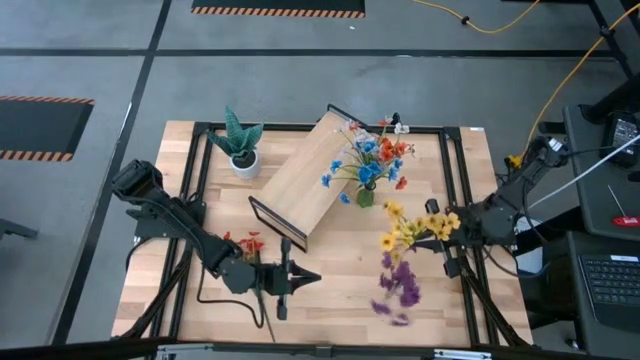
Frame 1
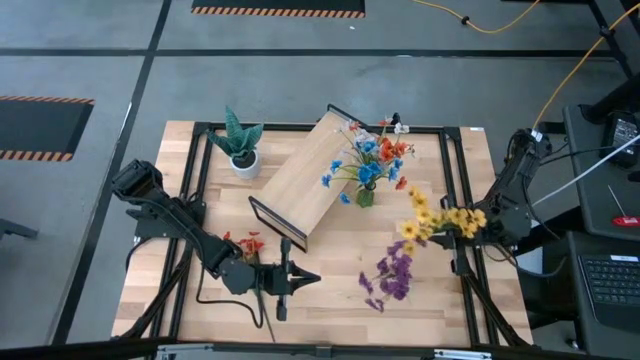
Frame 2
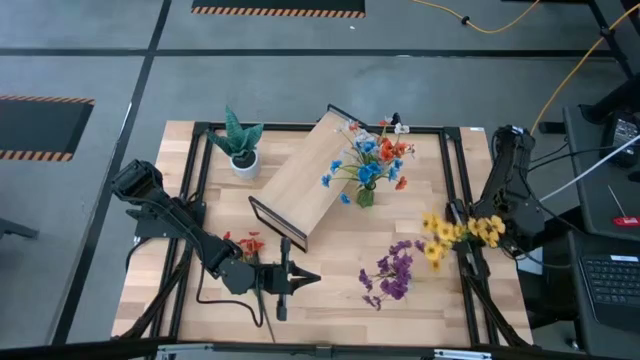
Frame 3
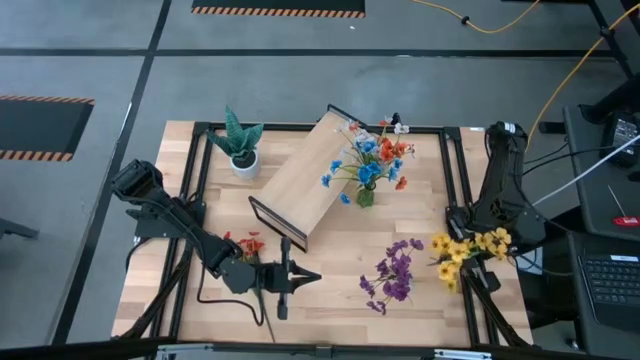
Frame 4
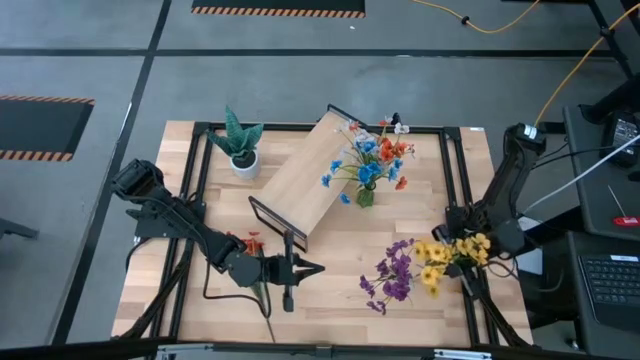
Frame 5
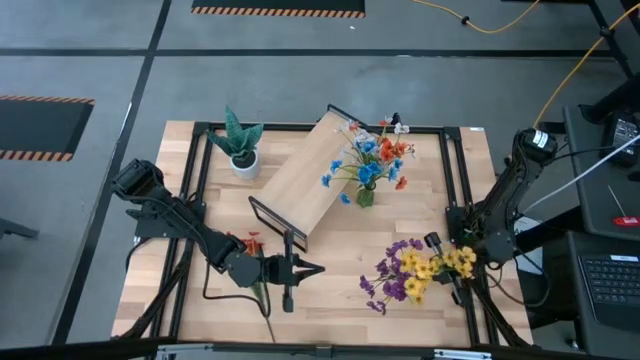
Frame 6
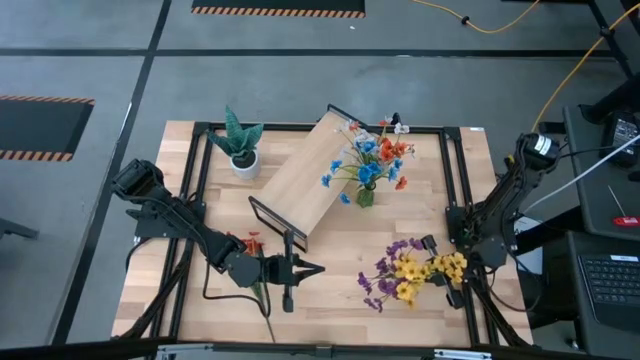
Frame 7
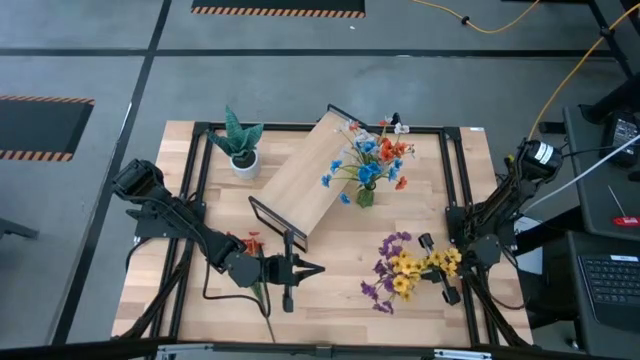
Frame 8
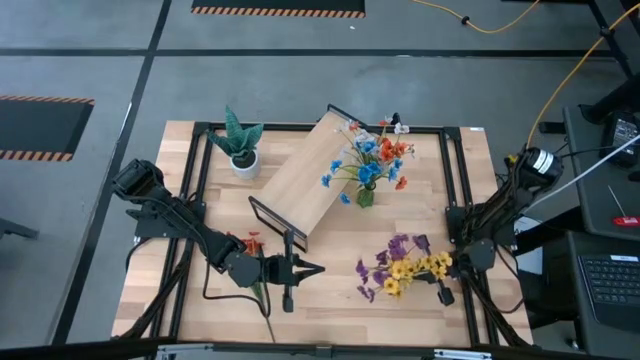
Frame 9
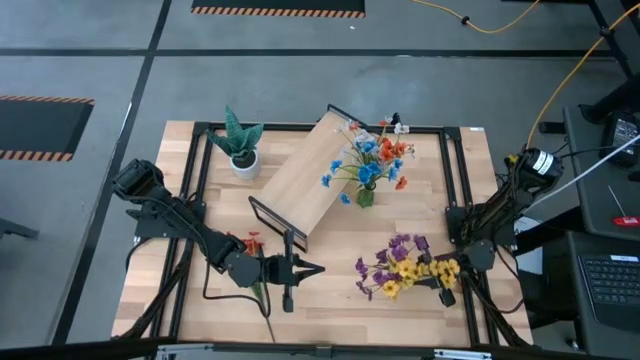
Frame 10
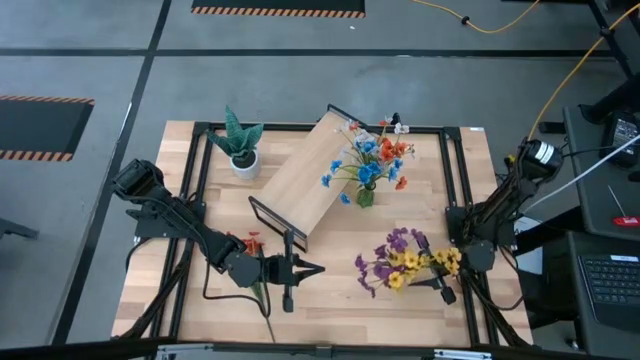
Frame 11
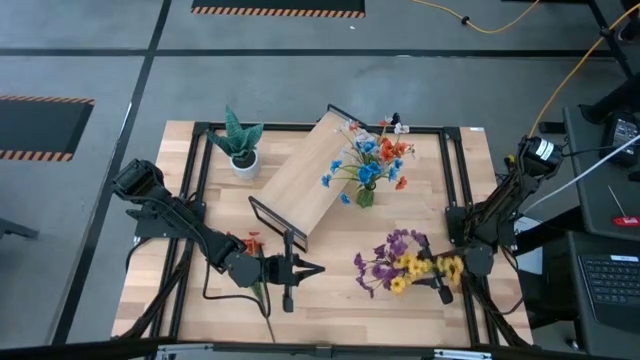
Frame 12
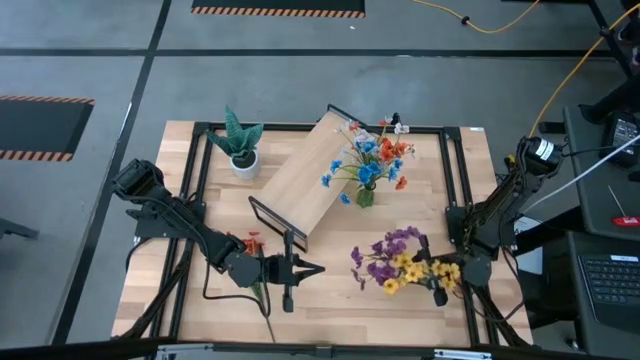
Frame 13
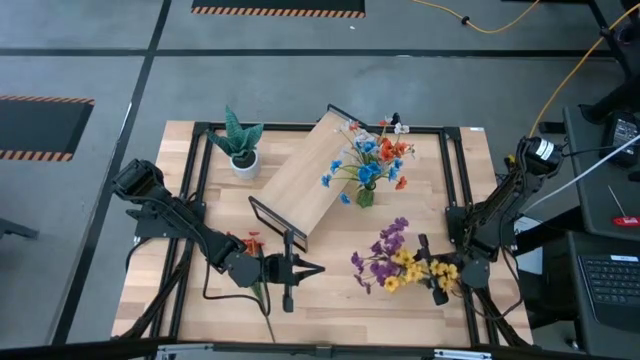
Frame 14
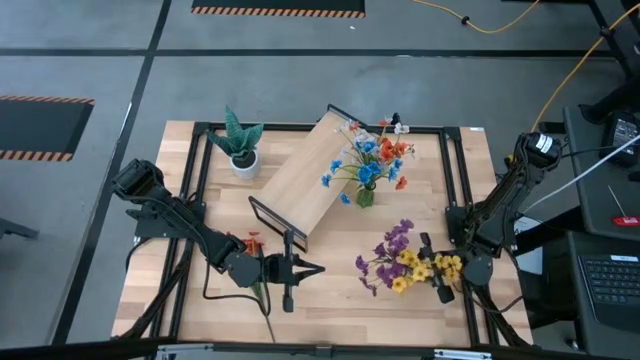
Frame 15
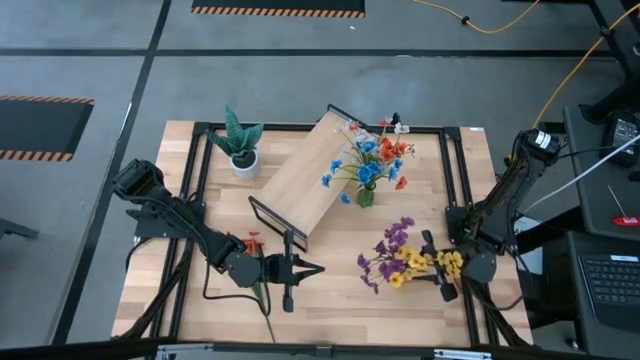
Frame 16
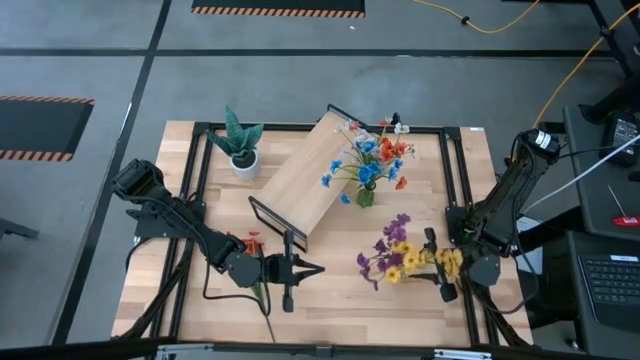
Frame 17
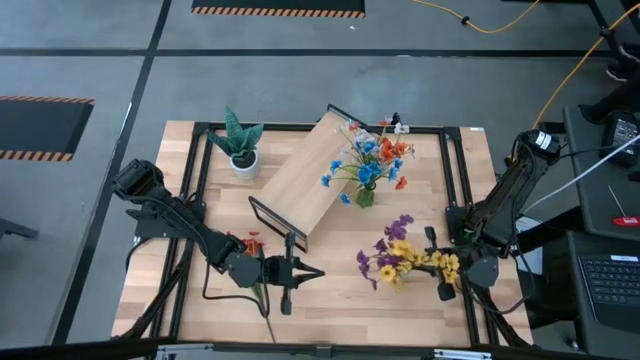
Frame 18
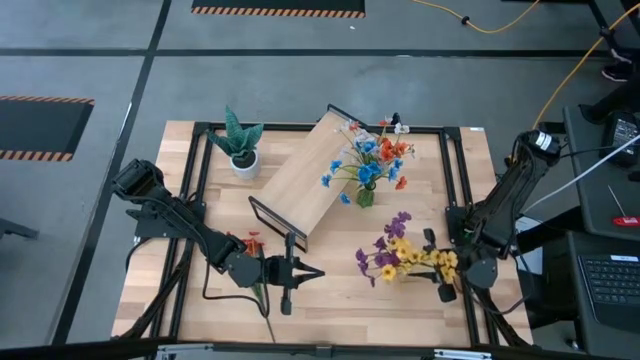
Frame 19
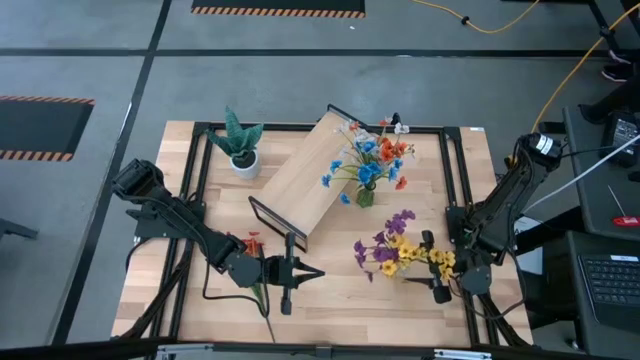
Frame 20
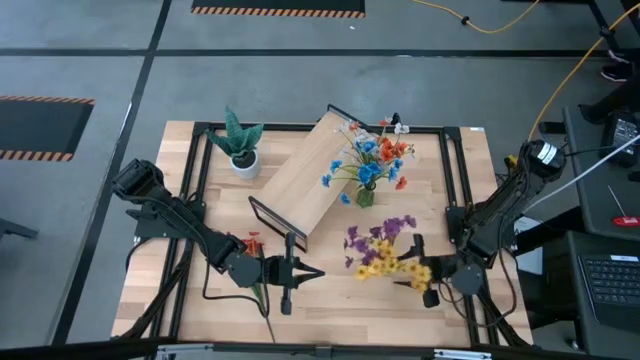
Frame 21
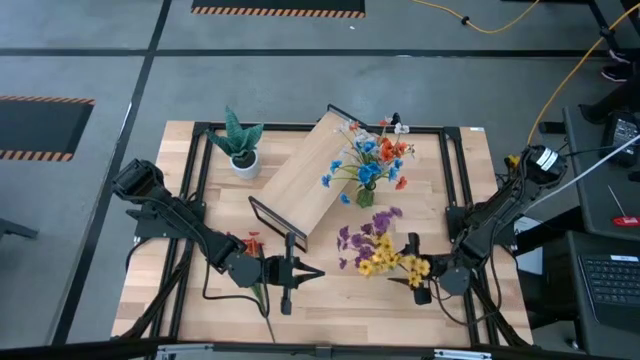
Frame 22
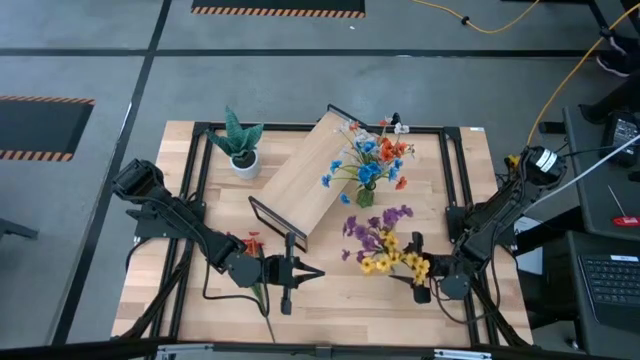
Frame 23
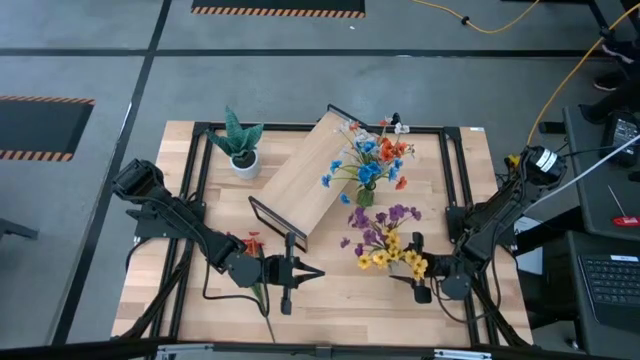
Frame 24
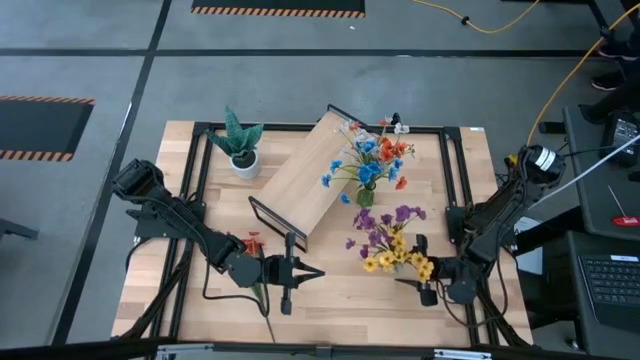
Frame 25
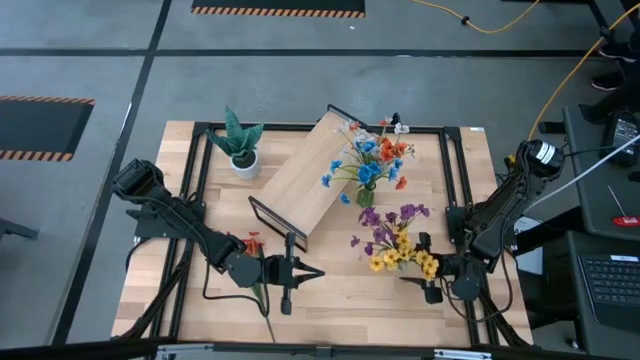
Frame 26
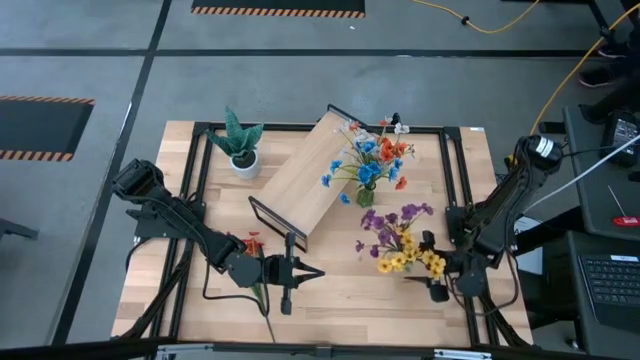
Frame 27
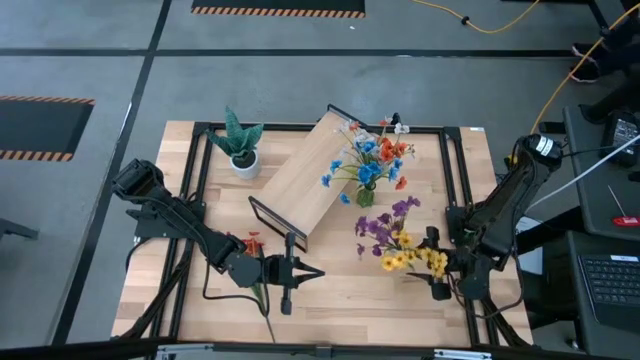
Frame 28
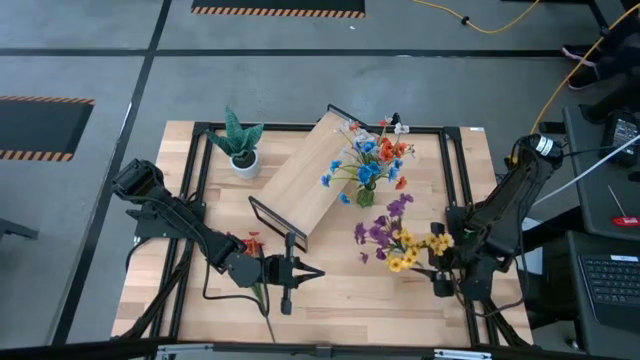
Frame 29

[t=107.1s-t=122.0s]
Task: Pick and place flowers into a vace then onto a shelf
Put the yellow flowers into the transparent vase

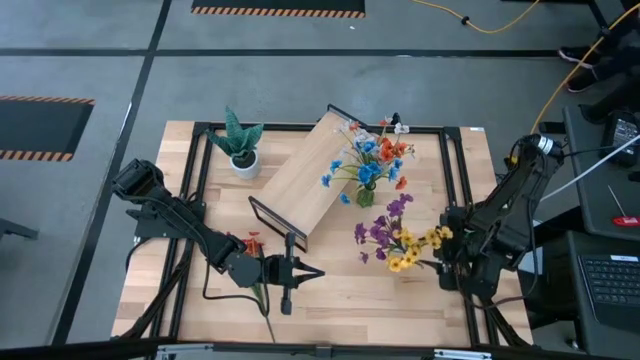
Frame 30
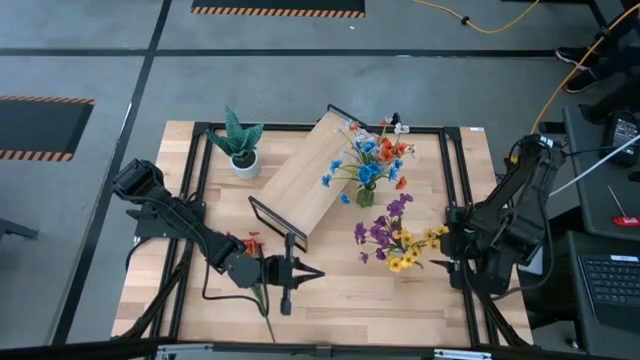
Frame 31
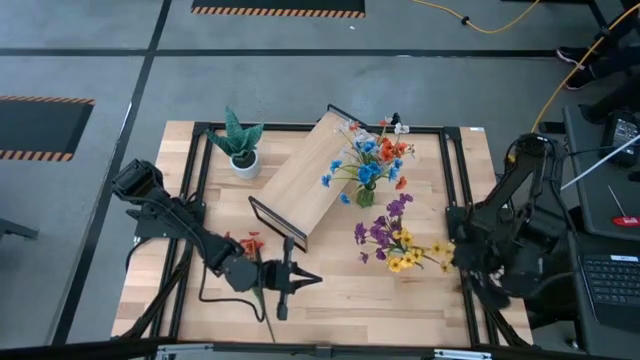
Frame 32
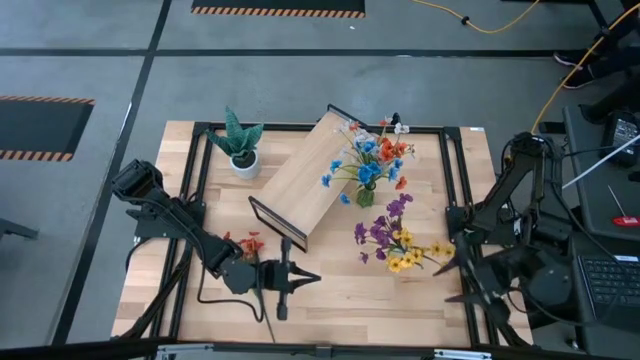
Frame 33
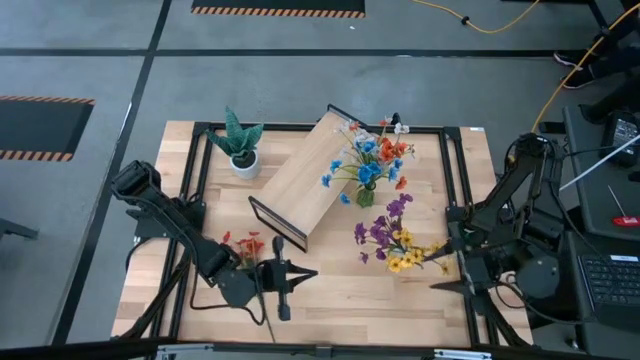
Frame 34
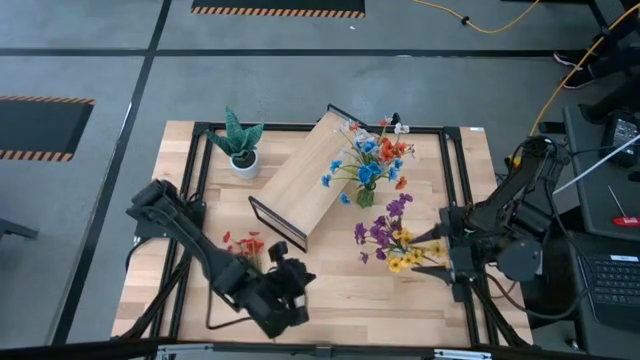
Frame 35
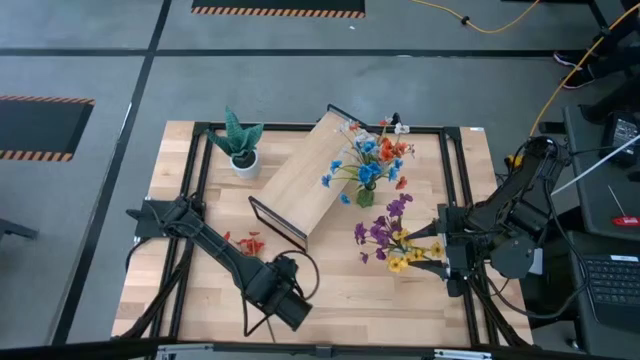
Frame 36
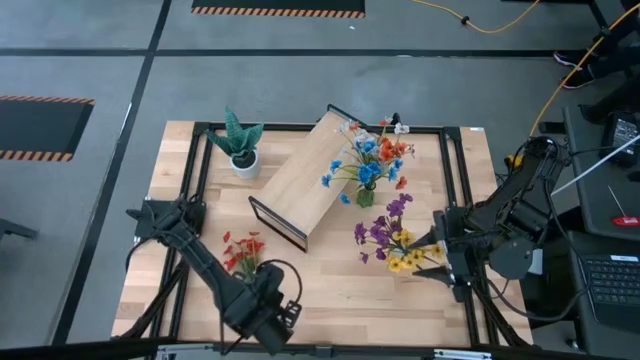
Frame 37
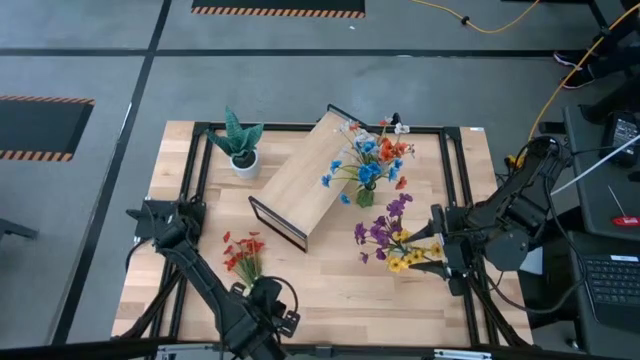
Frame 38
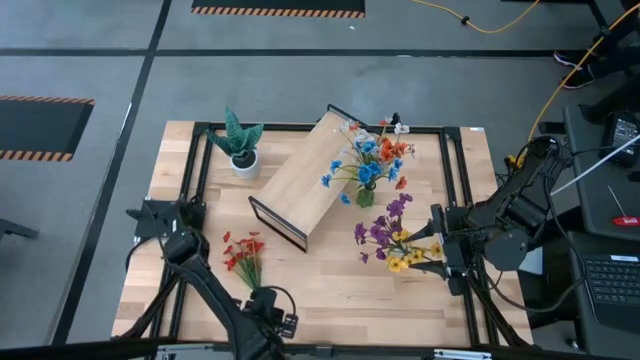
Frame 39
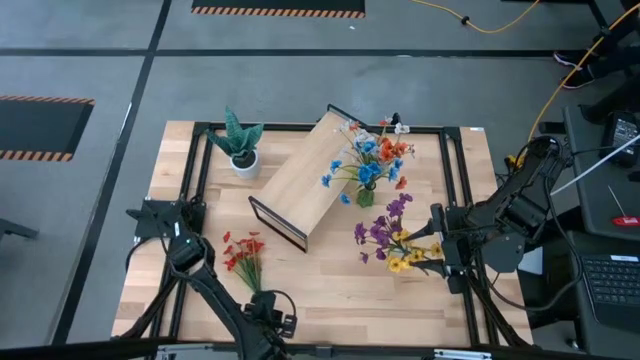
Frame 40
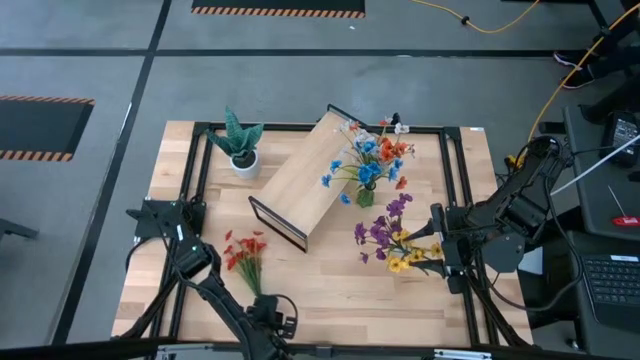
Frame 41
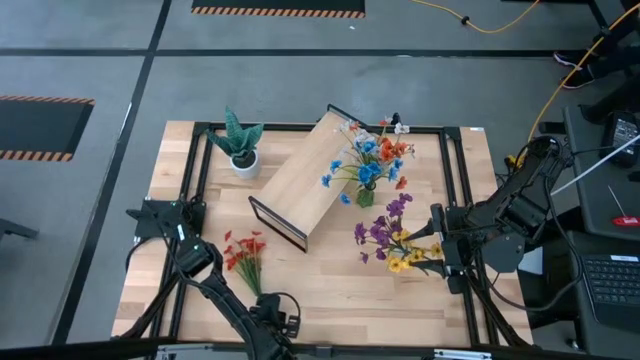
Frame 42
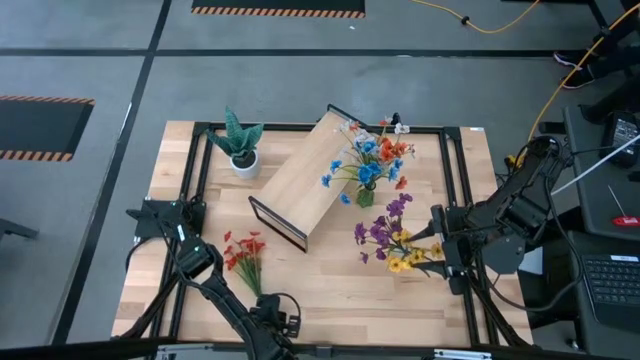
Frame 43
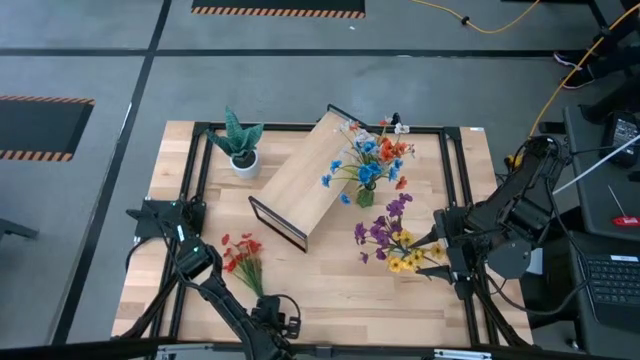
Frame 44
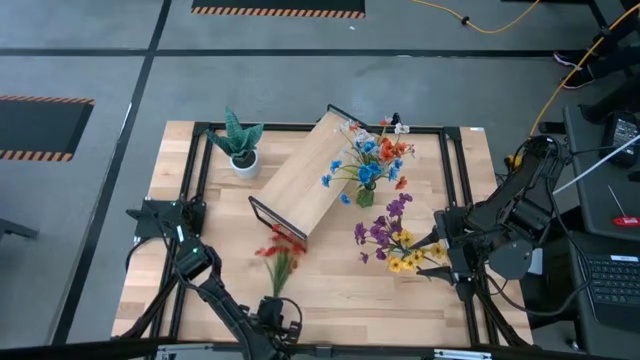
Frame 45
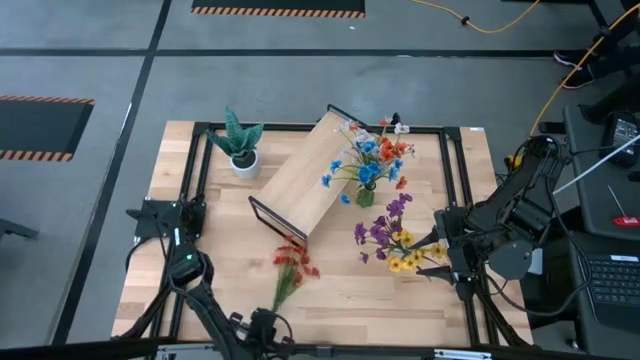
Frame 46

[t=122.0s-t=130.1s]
Put the red flowers into the transparent vase
